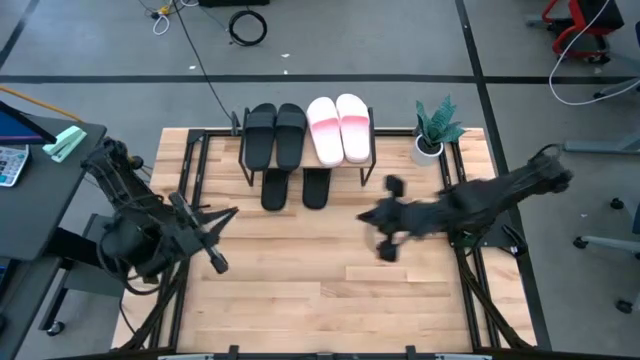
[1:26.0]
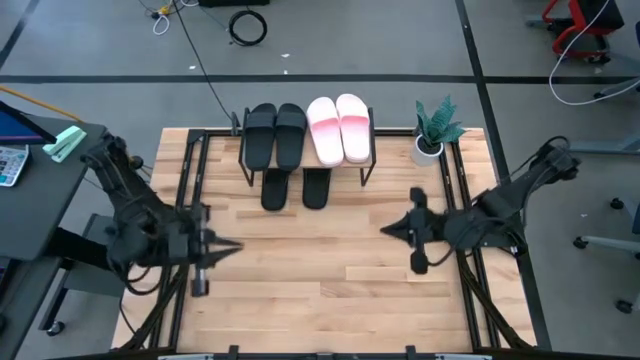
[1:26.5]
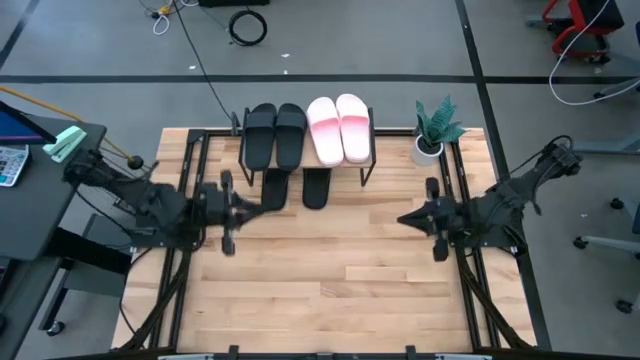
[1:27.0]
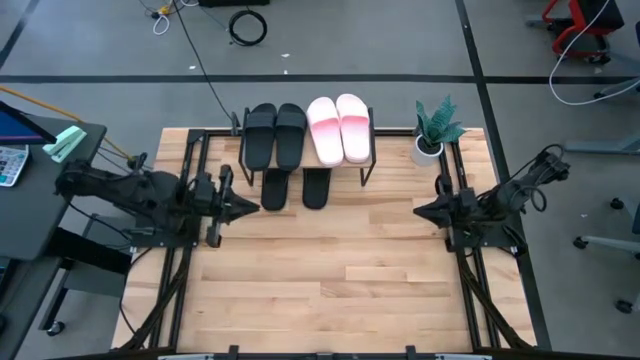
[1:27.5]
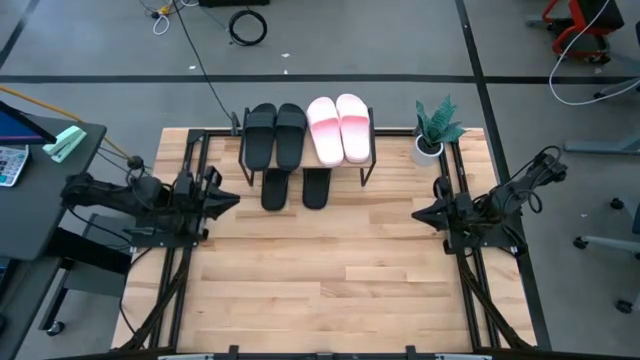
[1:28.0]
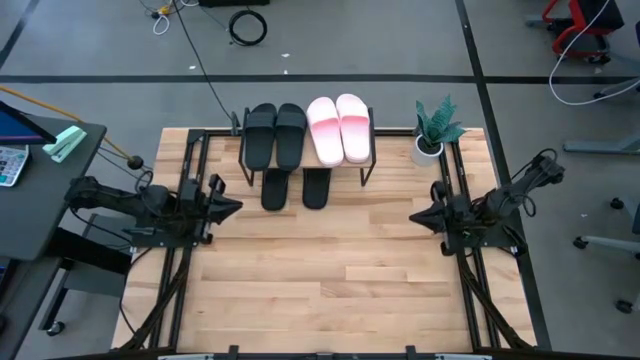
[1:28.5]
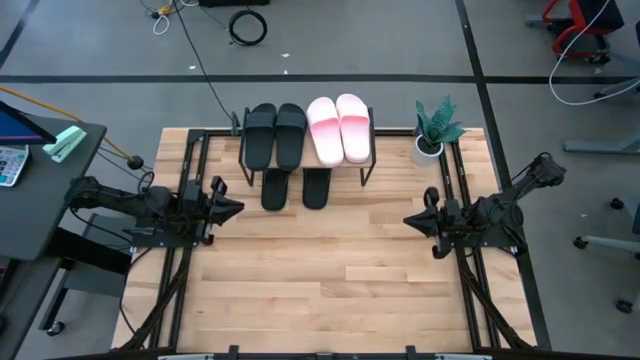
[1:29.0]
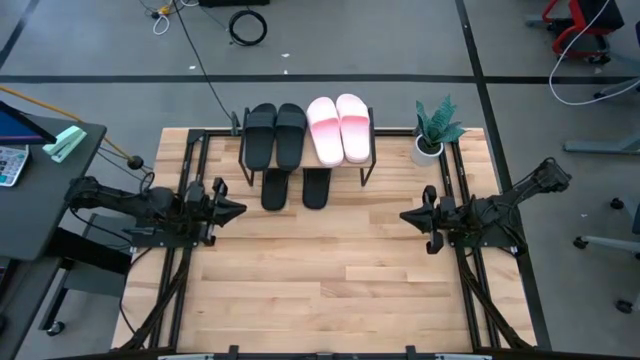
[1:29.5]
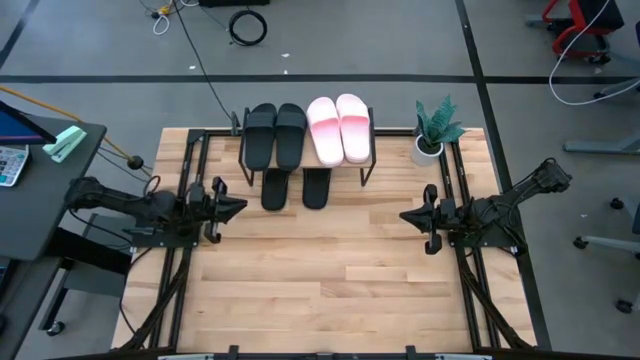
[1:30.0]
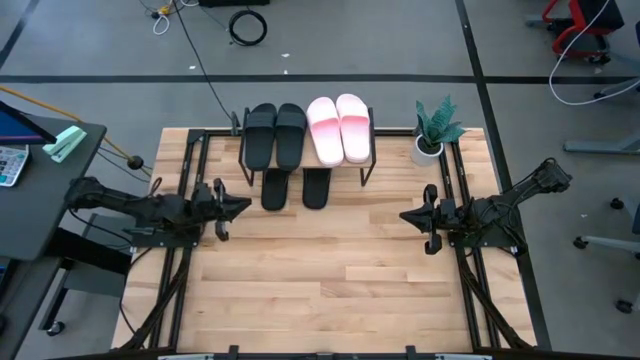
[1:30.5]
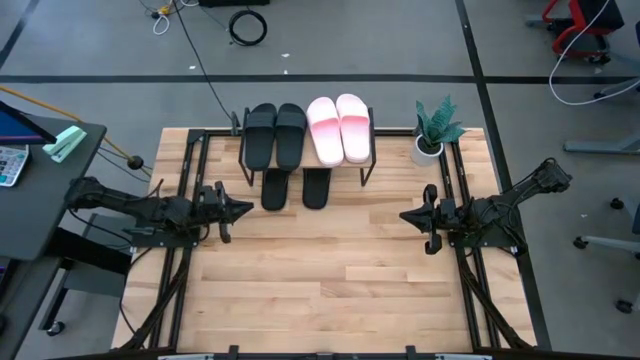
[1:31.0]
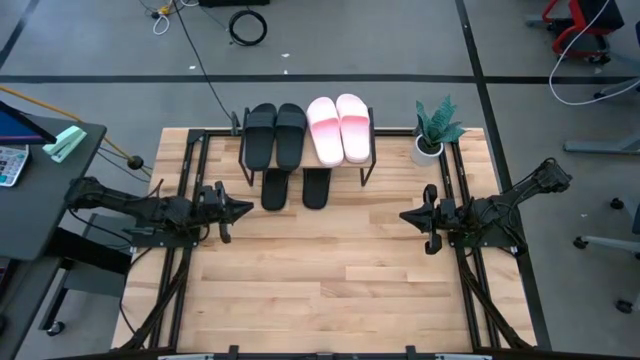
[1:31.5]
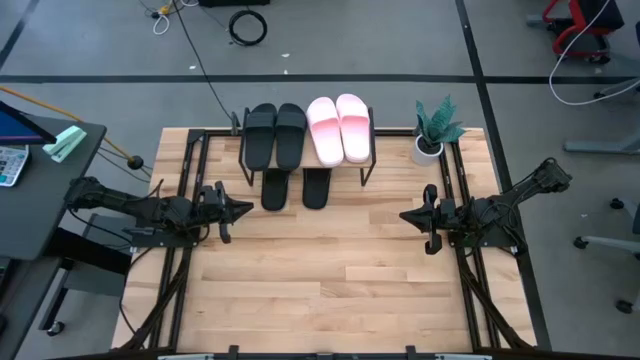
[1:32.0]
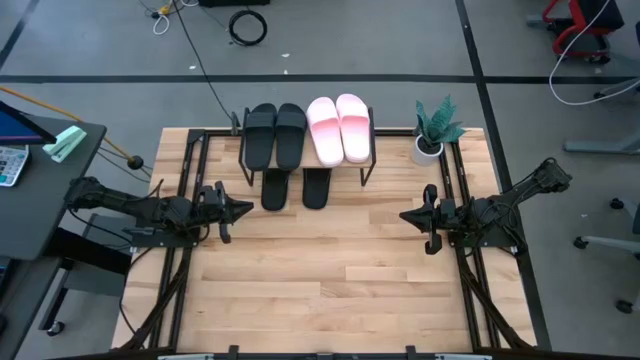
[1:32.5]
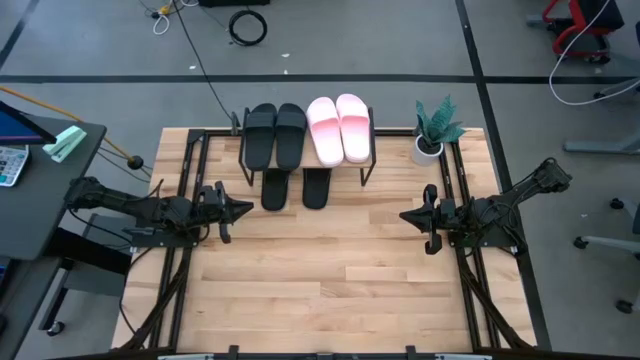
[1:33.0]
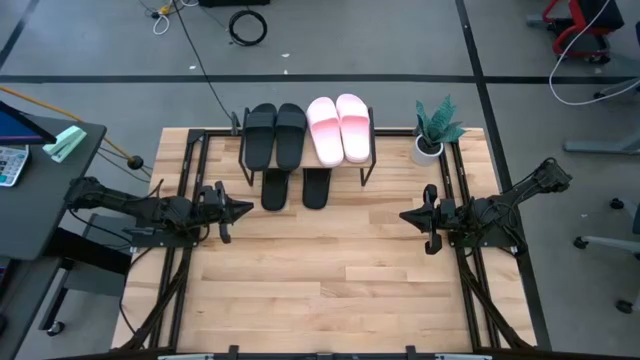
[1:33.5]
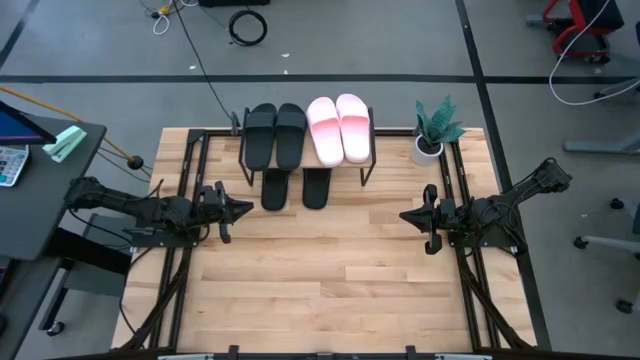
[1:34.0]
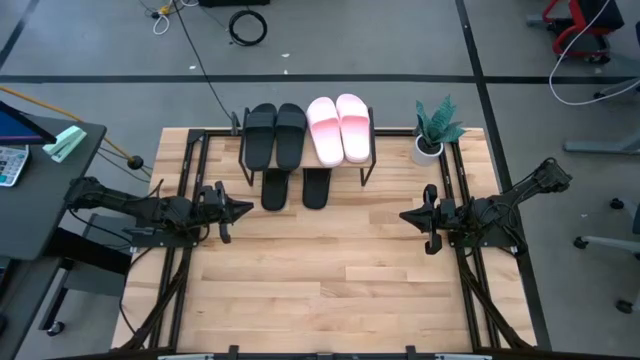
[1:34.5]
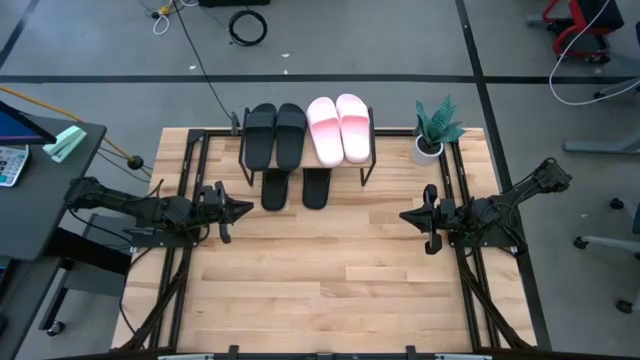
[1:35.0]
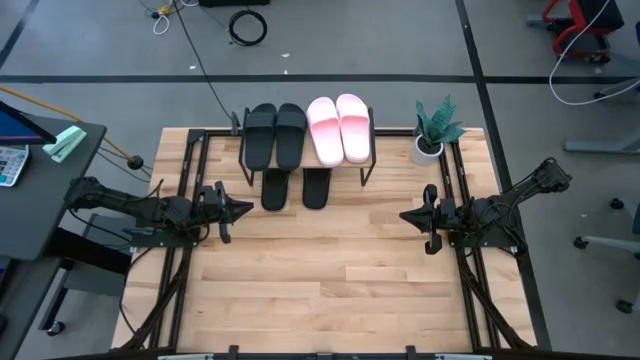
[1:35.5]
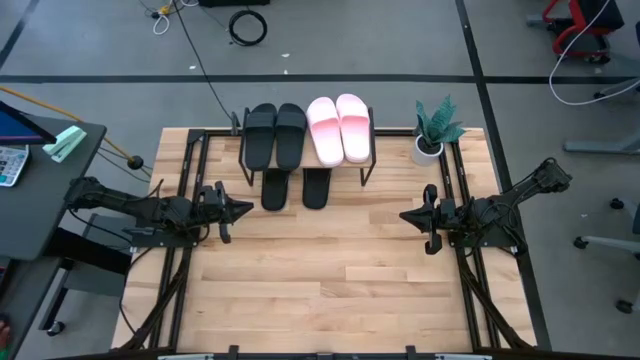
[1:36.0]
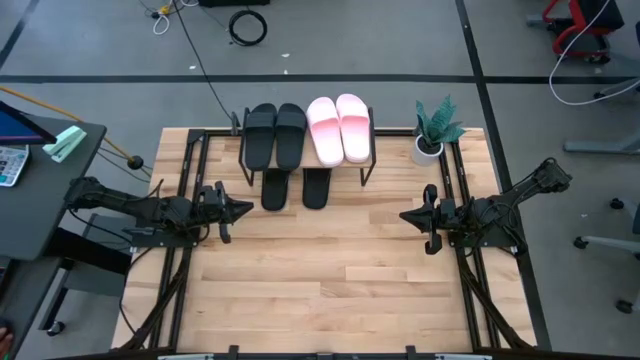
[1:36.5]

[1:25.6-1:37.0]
Task: Pick and place slides into the shelf
Return to Home Position
